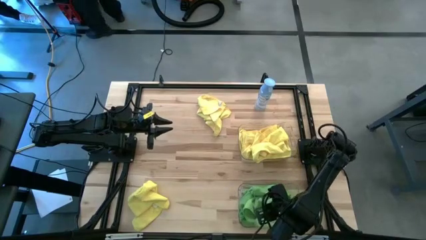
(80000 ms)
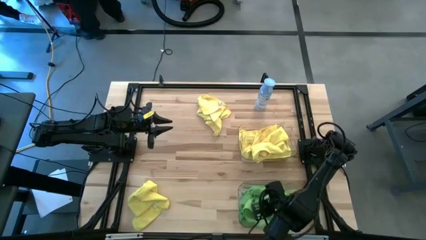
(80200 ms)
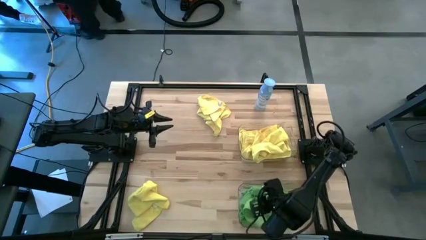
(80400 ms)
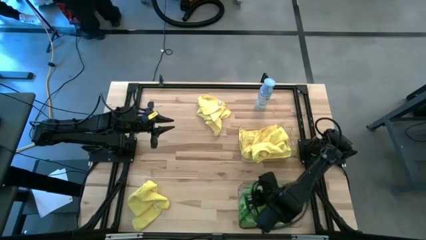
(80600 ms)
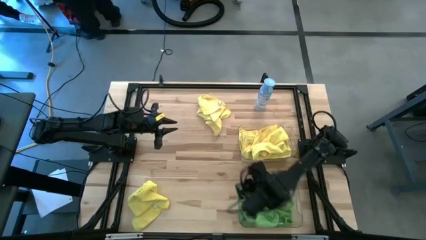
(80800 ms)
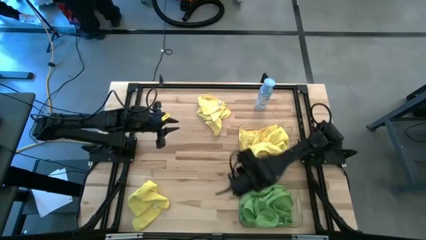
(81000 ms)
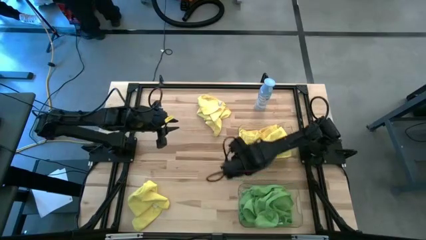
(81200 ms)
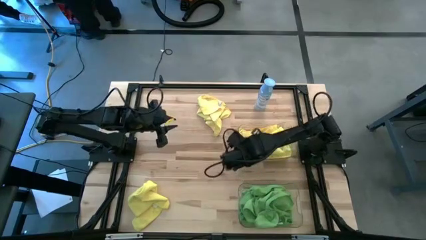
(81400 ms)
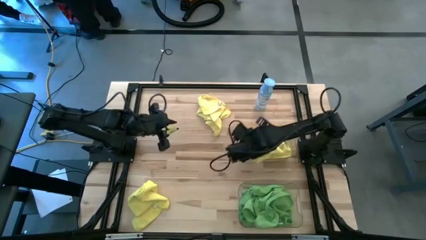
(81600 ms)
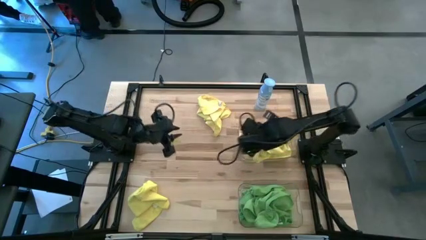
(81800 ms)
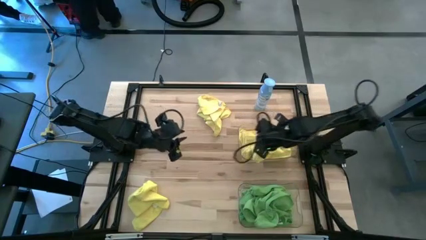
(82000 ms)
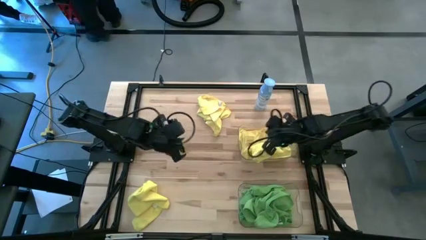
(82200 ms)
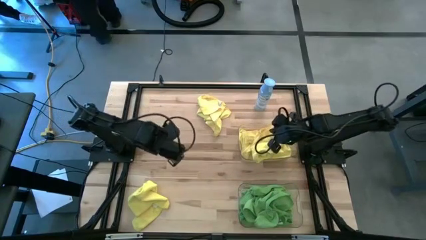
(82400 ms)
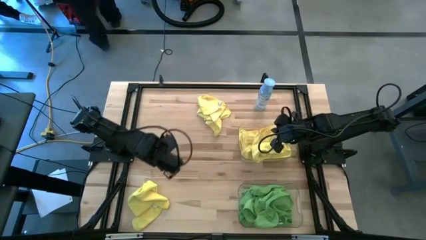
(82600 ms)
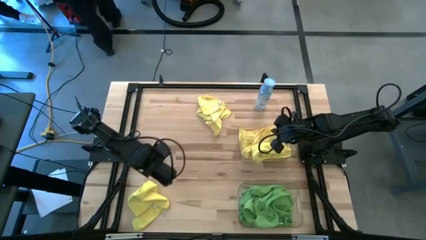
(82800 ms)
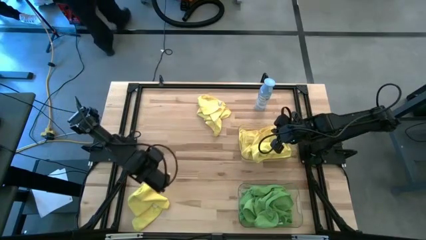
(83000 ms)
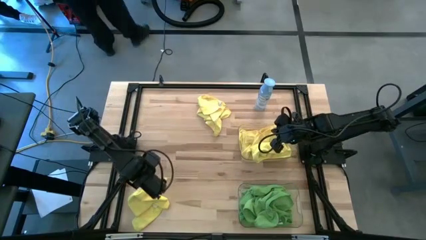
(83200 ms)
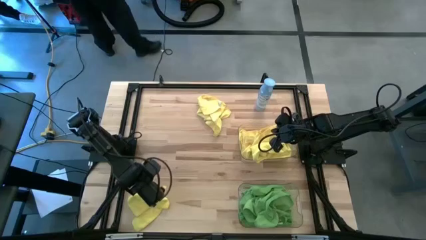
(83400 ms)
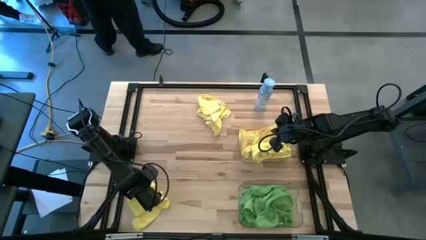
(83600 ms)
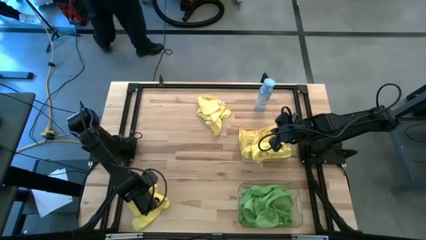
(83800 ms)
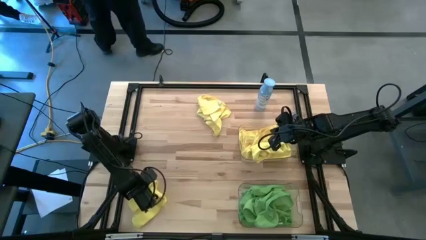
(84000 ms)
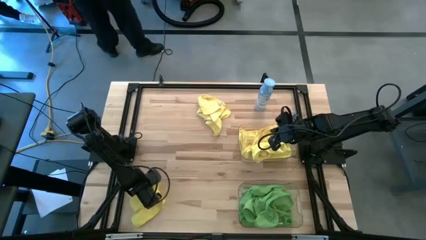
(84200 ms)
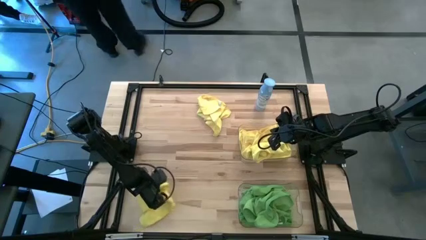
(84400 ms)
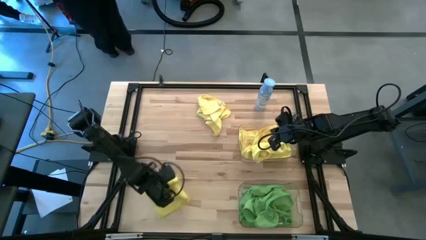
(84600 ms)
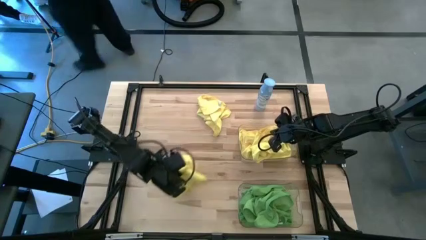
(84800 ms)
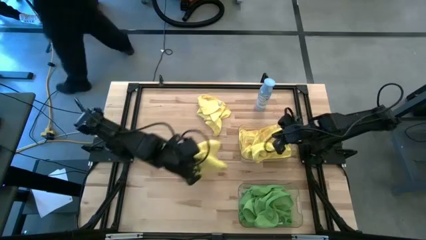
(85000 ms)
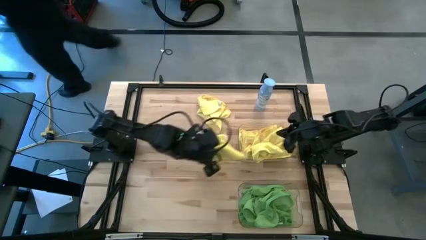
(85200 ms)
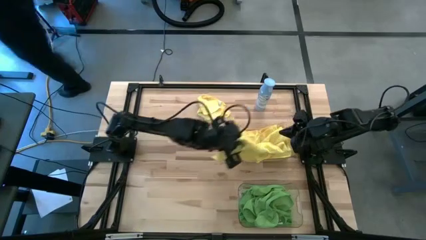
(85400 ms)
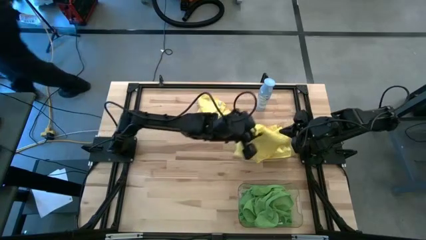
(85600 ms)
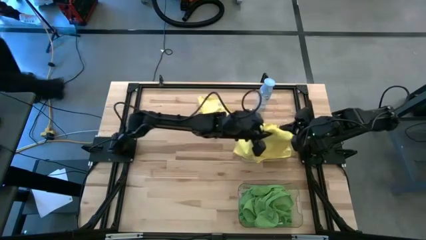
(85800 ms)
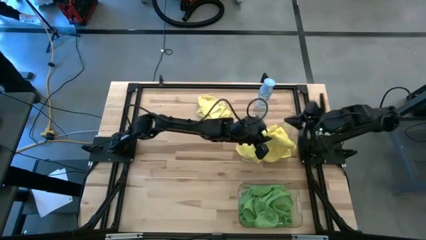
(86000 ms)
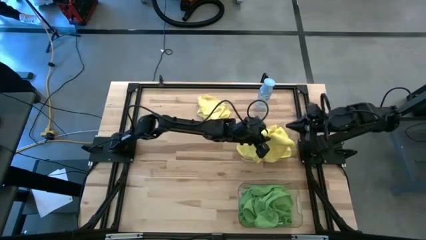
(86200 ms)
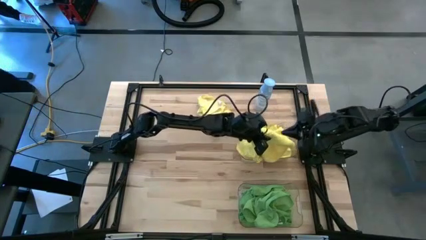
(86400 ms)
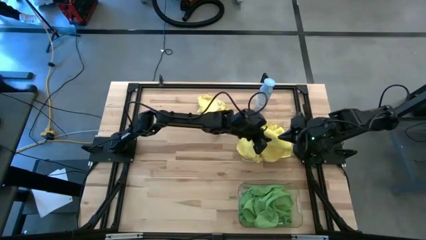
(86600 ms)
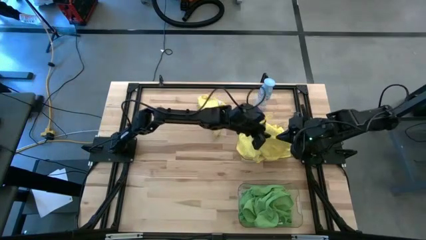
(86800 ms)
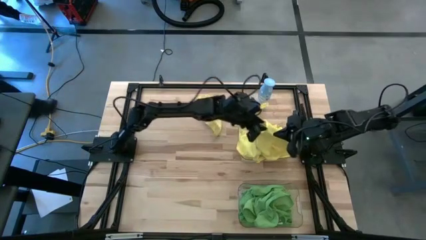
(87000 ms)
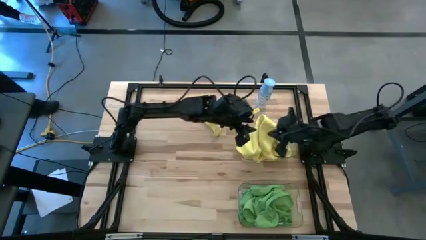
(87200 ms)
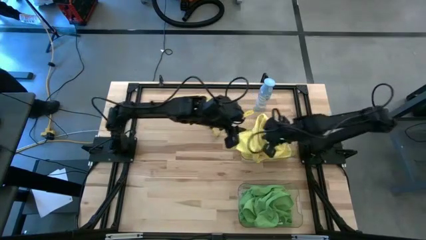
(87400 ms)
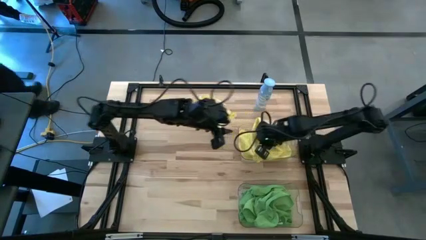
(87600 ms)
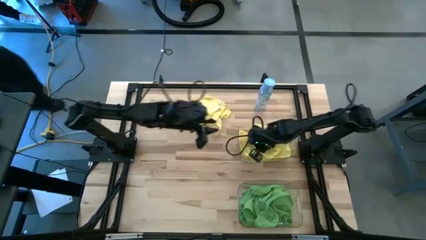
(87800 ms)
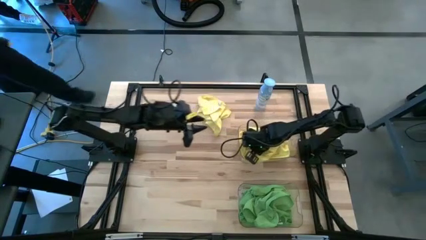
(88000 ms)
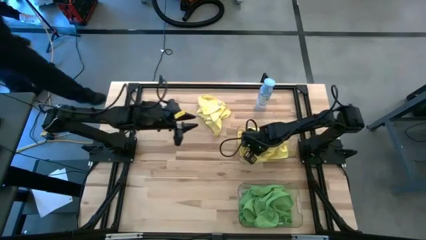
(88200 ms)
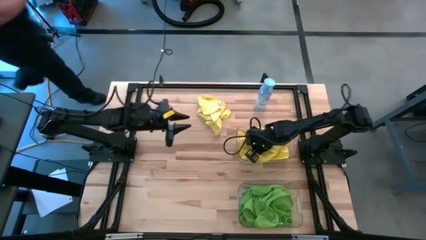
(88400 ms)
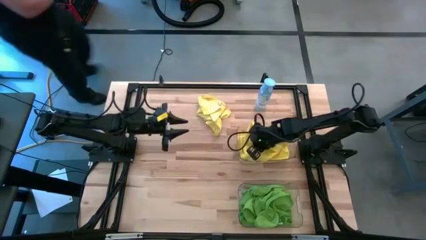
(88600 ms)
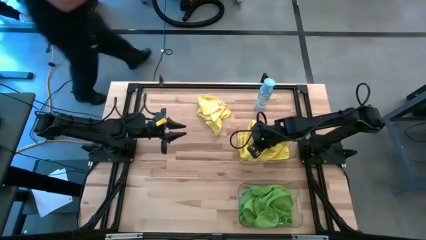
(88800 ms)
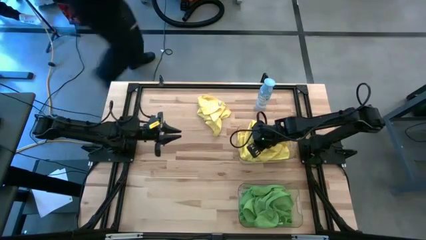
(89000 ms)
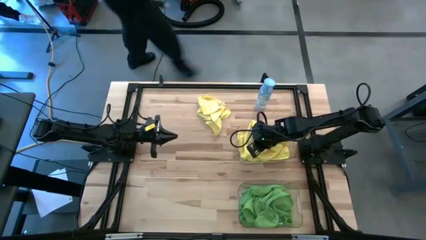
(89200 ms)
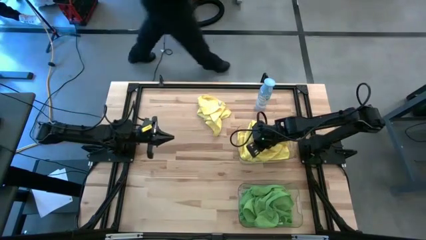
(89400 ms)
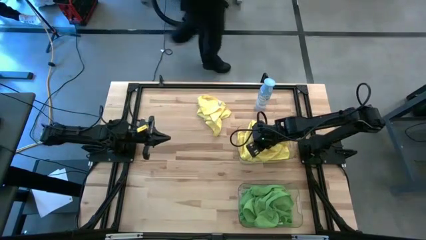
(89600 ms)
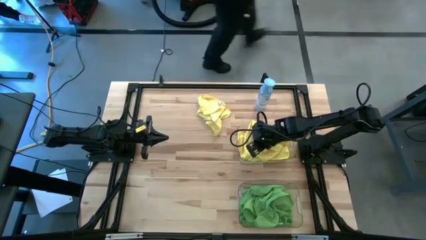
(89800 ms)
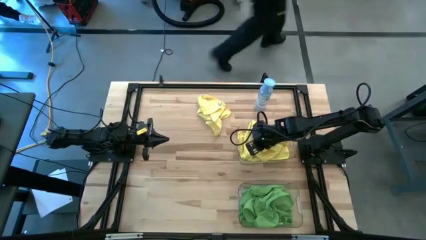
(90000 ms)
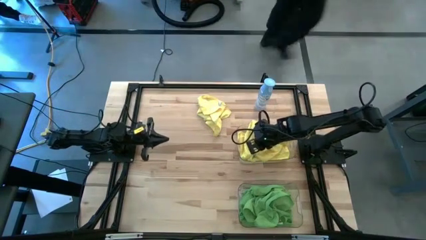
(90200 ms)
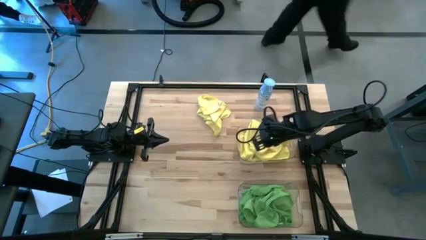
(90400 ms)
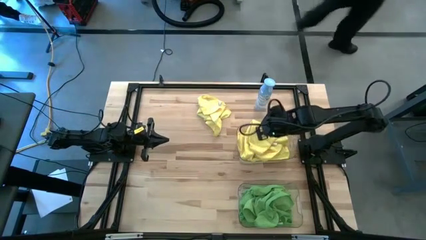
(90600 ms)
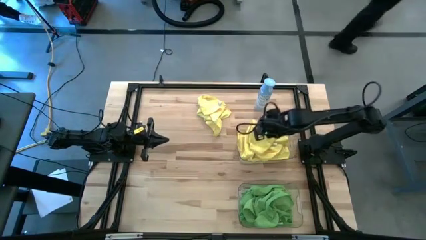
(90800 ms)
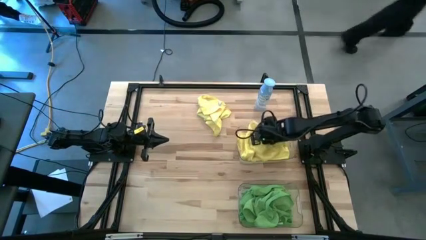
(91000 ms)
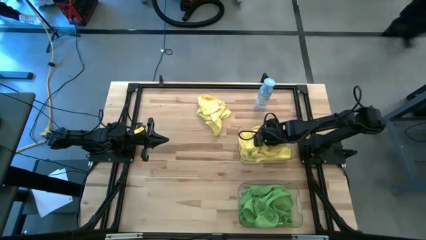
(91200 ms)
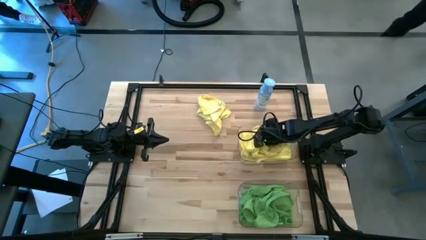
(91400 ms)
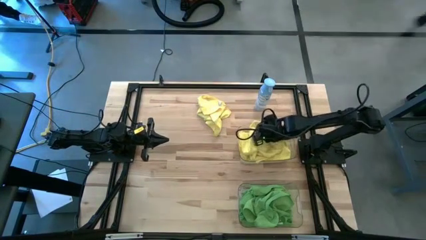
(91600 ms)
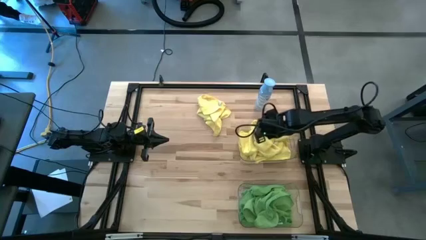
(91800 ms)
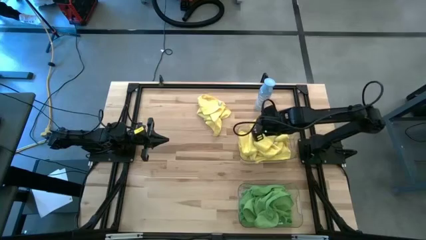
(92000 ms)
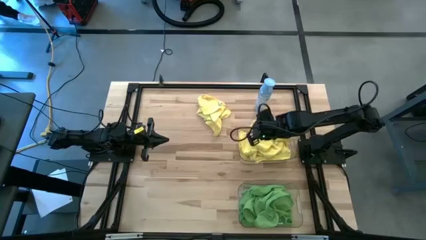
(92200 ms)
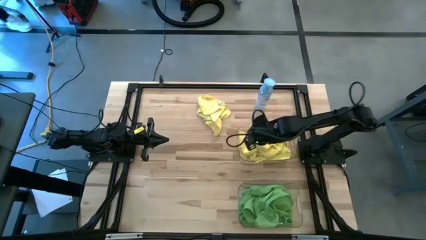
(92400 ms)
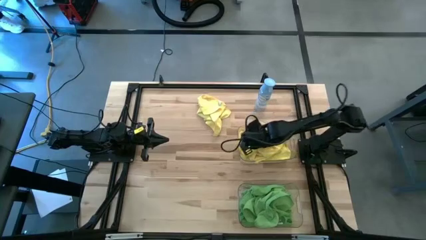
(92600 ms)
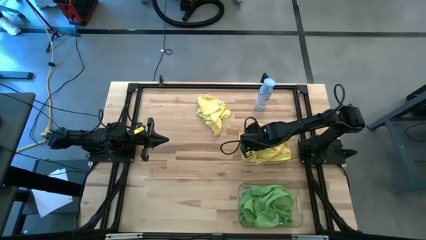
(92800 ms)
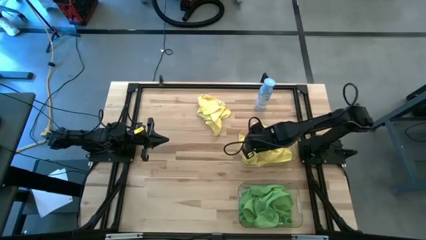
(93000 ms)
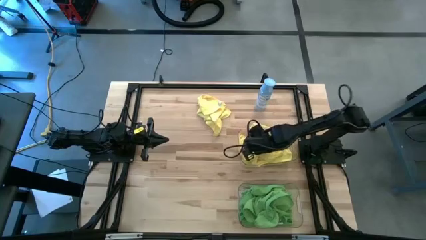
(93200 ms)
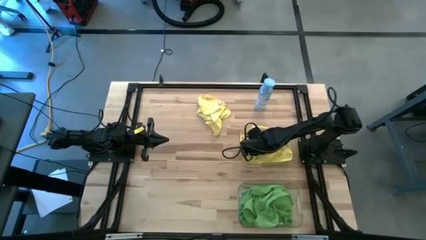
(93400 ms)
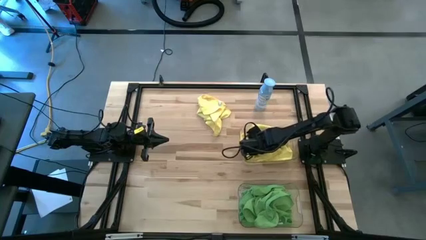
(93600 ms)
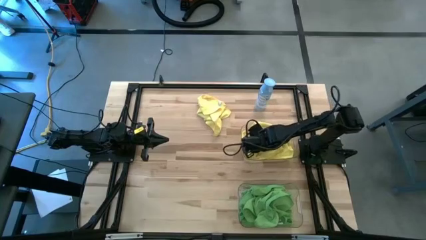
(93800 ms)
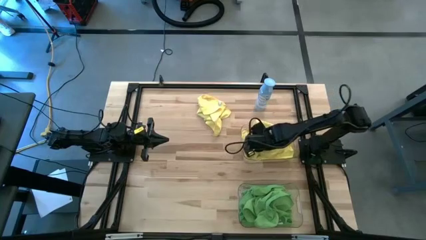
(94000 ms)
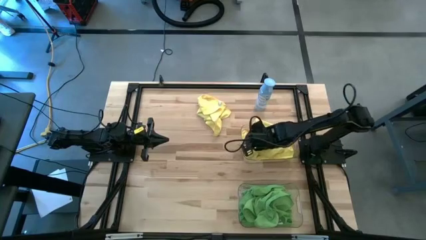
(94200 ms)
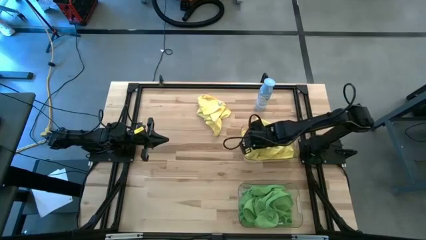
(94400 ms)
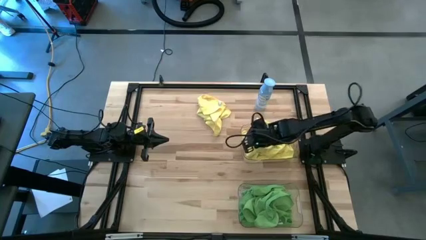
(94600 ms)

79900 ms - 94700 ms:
Task: Sort microfiber towel by color & place in baskets
Put the yellow microfiber towel into the top transparent bin
